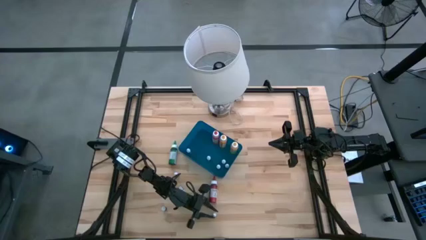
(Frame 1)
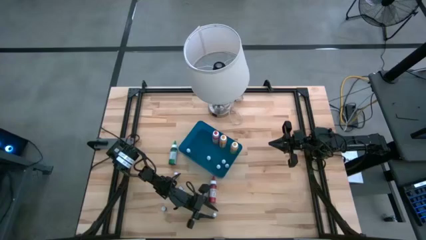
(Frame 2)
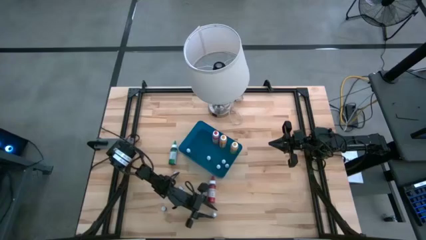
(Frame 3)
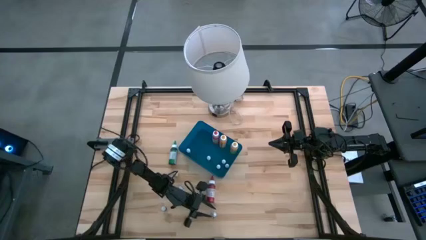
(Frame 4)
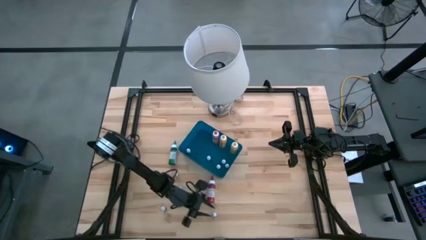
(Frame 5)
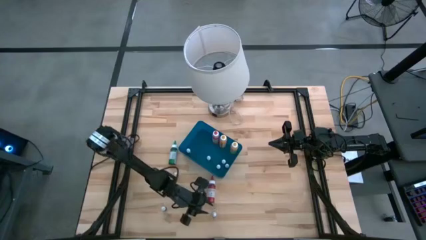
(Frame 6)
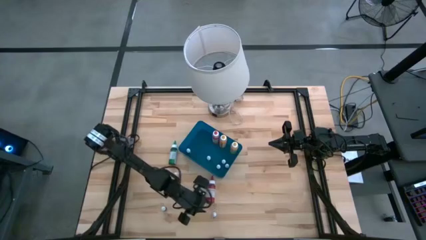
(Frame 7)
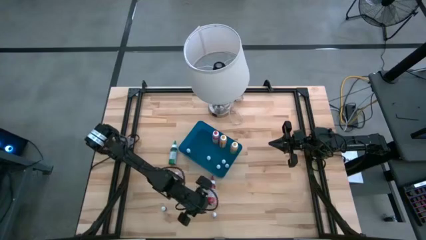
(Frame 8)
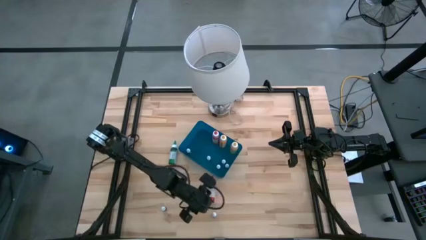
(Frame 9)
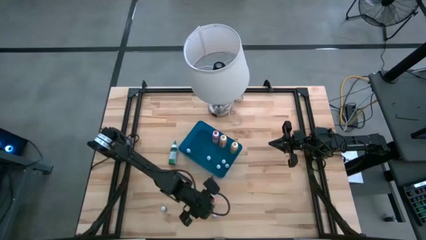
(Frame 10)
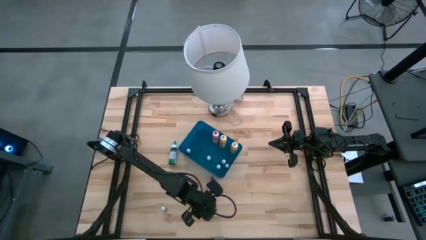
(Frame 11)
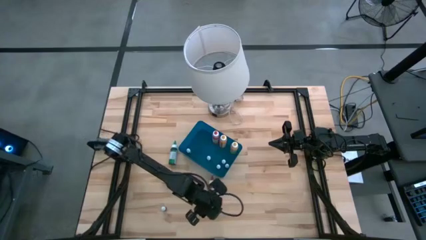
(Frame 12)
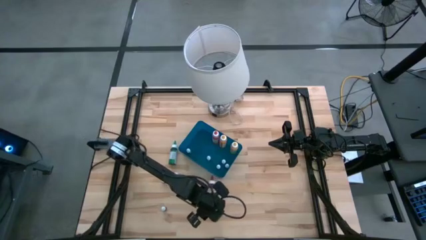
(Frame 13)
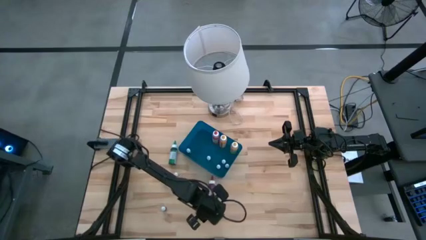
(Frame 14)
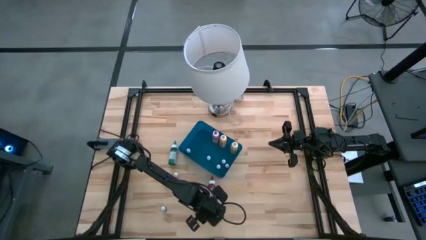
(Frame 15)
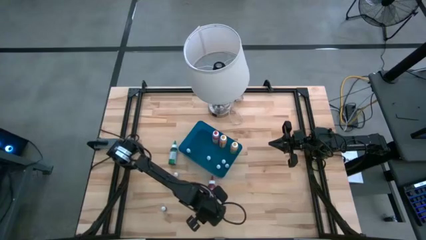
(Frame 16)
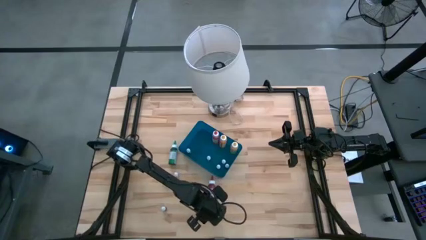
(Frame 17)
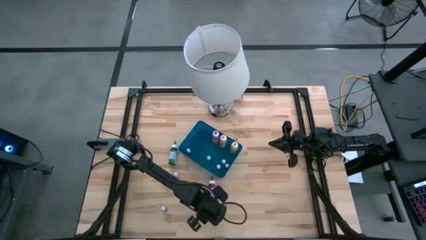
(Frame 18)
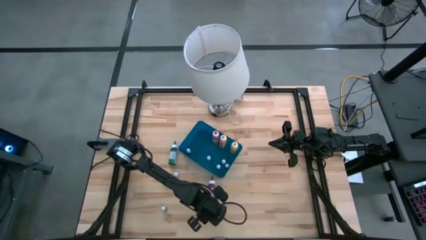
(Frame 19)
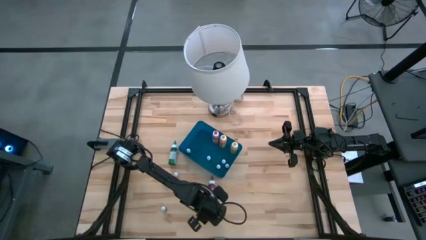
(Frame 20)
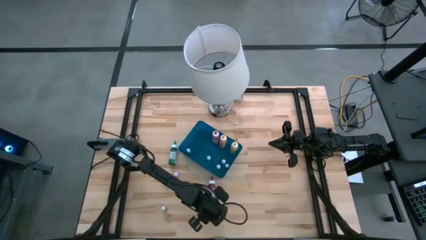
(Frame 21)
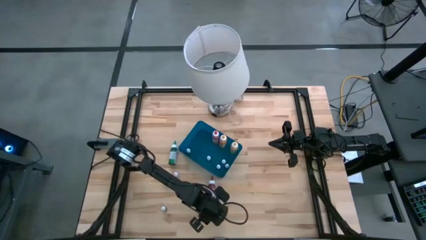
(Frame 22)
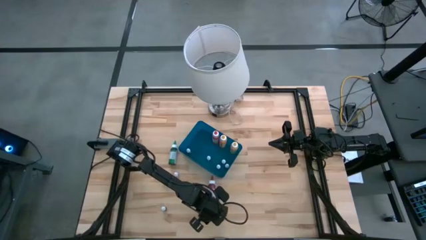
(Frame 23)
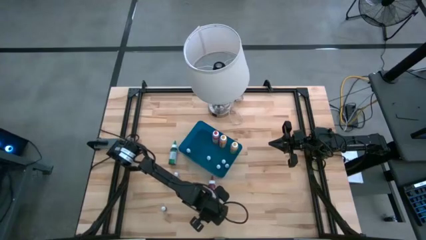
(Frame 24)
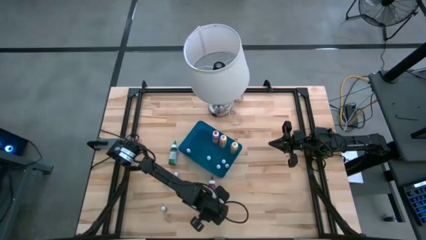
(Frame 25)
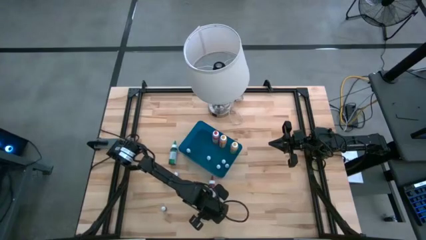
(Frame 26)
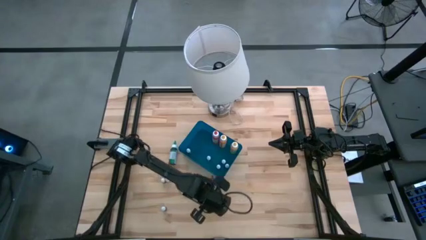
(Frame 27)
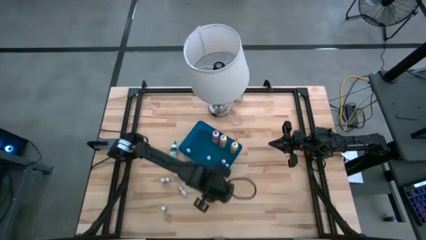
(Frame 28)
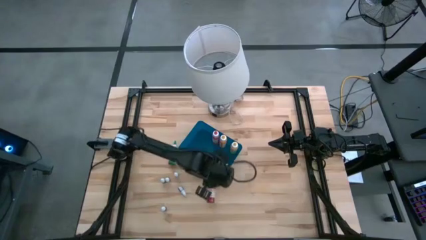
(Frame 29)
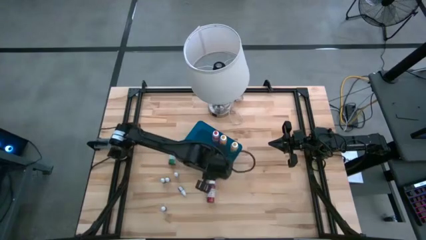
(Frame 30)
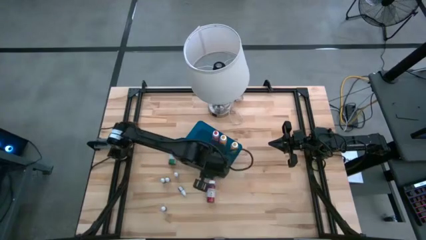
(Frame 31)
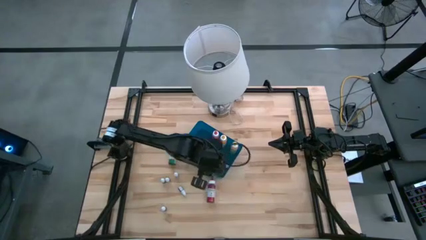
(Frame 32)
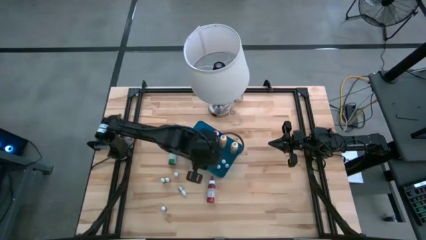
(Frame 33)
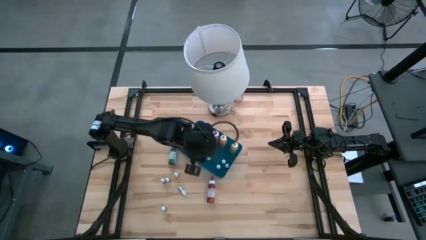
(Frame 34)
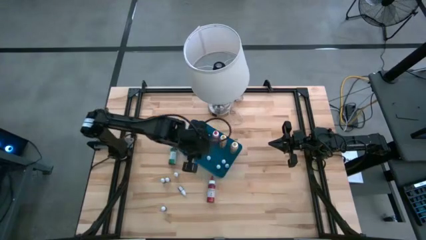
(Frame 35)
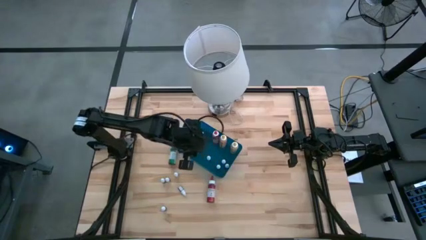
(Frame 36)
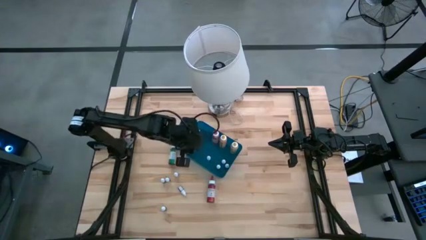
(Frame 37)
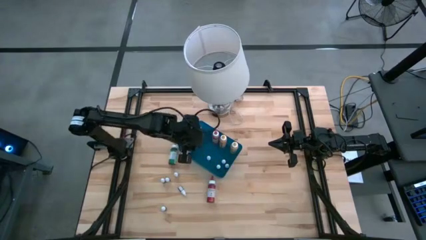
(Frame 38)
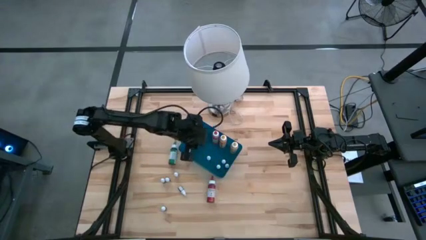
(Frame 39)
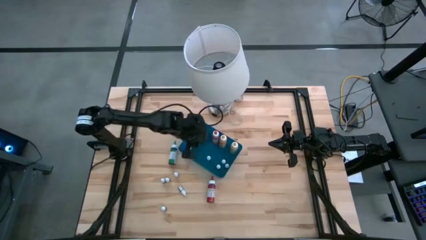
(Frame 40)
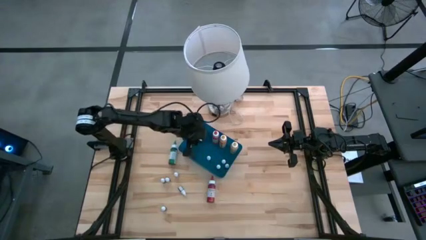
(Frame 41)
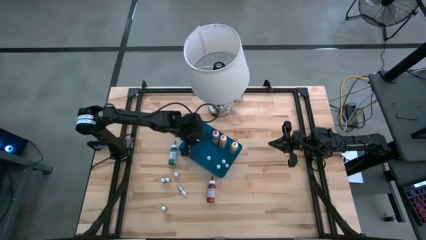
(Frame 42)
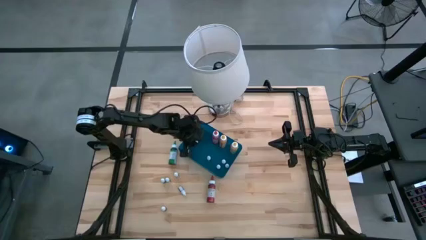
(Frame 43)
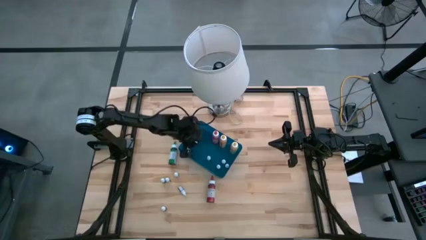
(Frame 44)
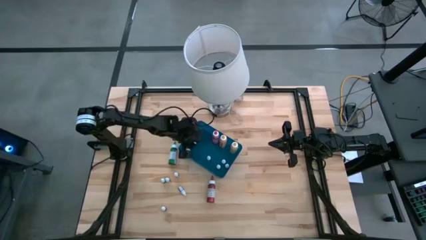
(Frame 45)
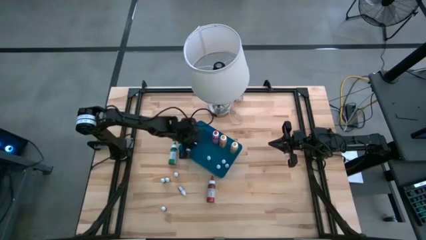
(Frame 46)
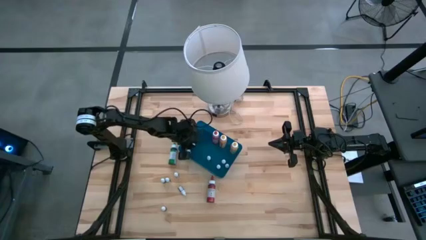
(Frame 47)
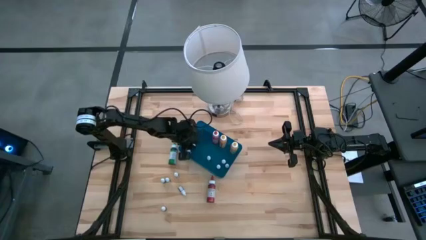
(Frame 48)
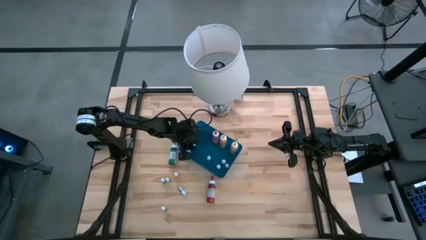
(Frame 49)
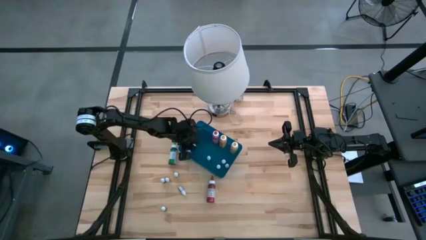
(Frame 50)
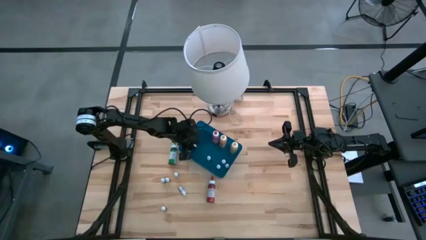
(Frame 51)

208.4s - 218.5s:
Task: Pick & Place food coloring
Put the small red food coloring bottle into the blue container
